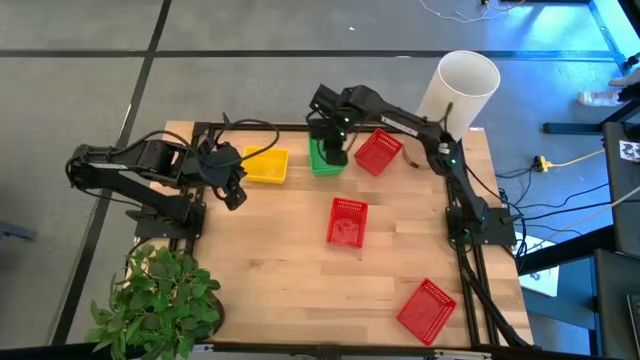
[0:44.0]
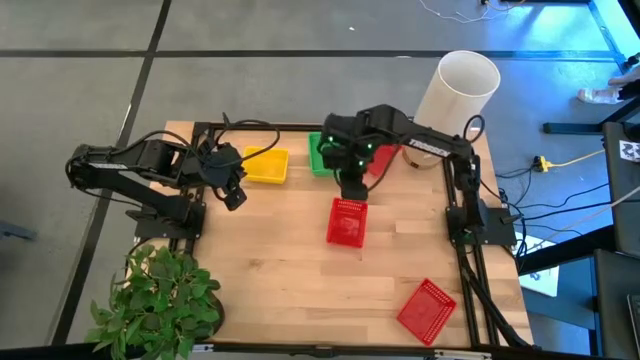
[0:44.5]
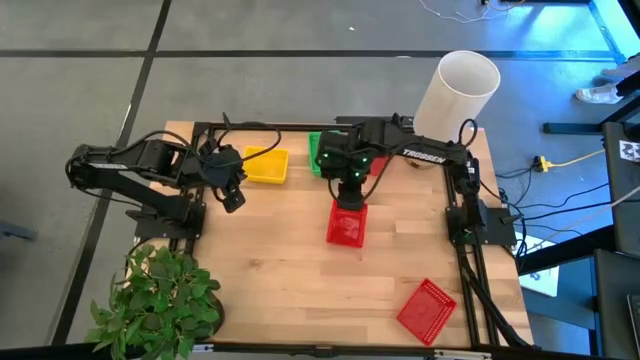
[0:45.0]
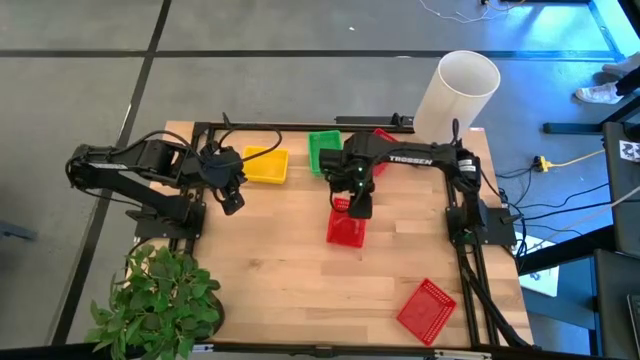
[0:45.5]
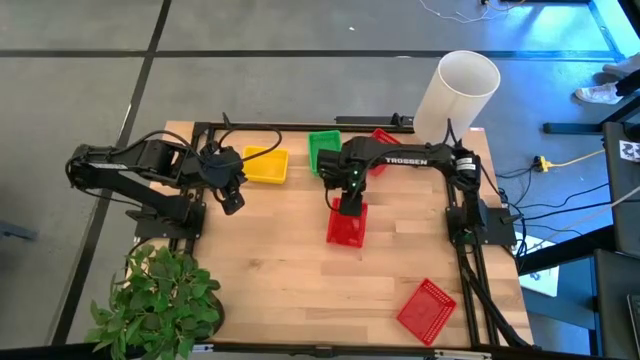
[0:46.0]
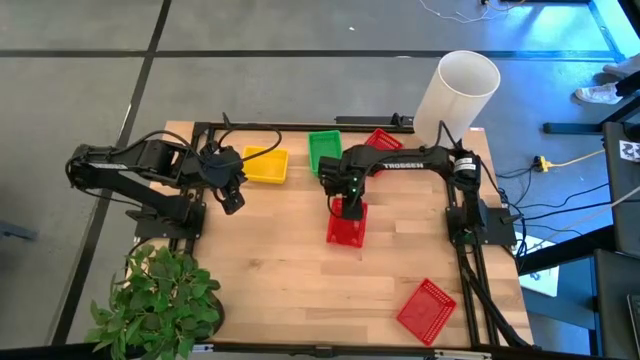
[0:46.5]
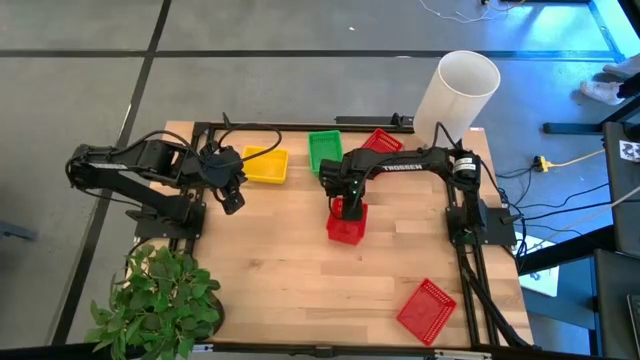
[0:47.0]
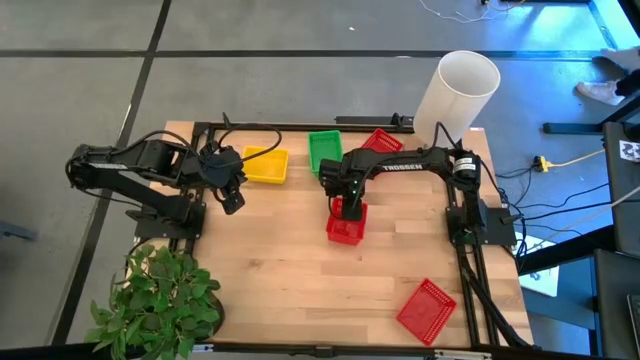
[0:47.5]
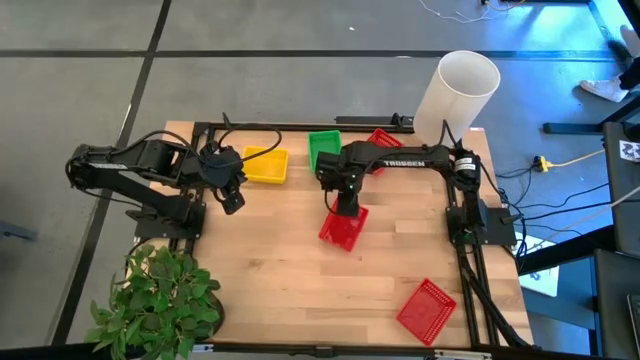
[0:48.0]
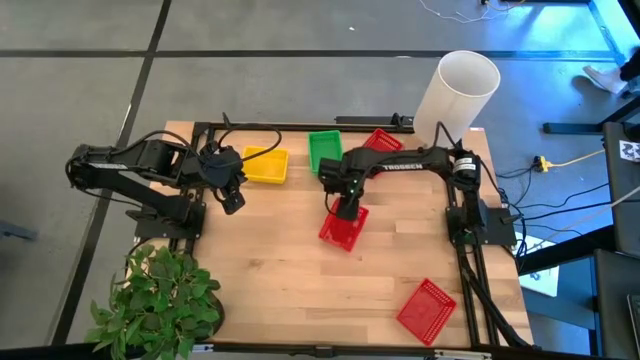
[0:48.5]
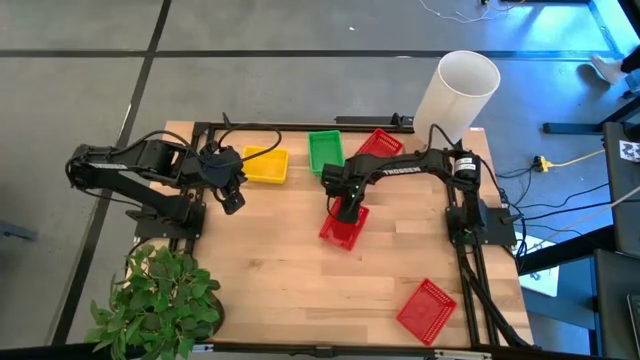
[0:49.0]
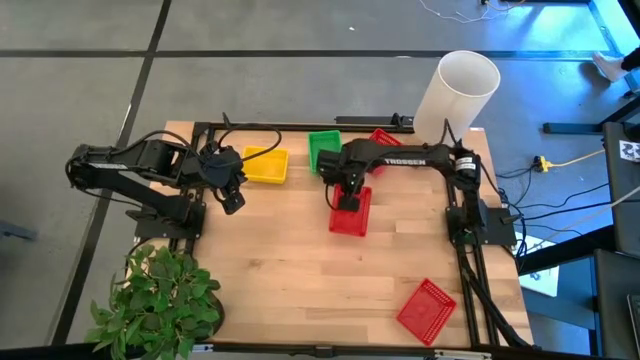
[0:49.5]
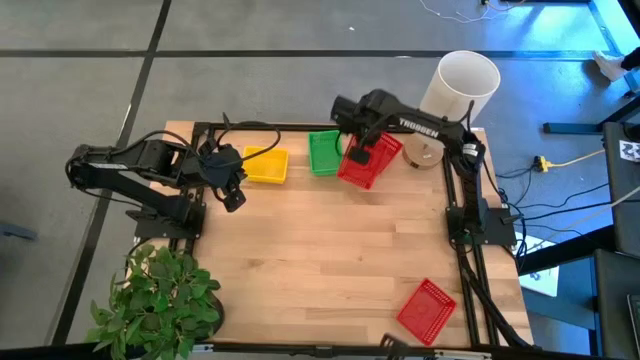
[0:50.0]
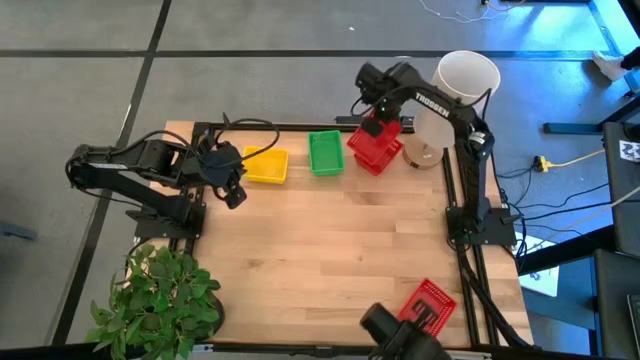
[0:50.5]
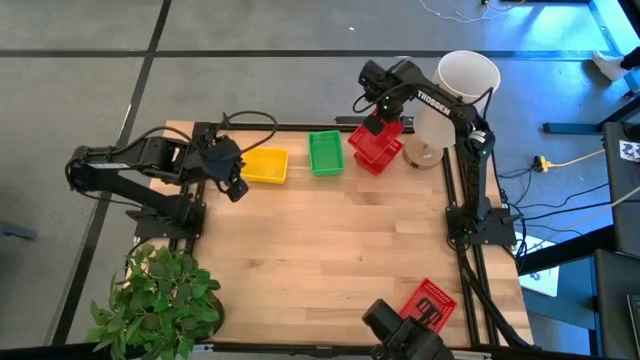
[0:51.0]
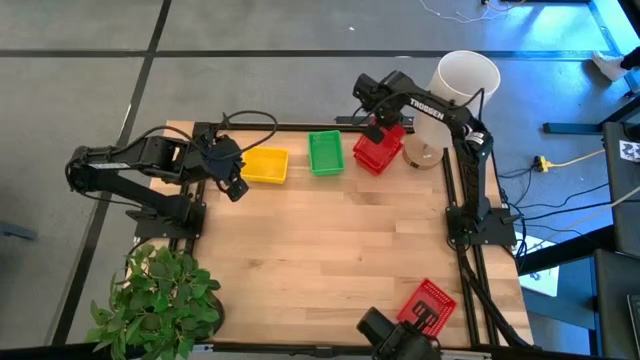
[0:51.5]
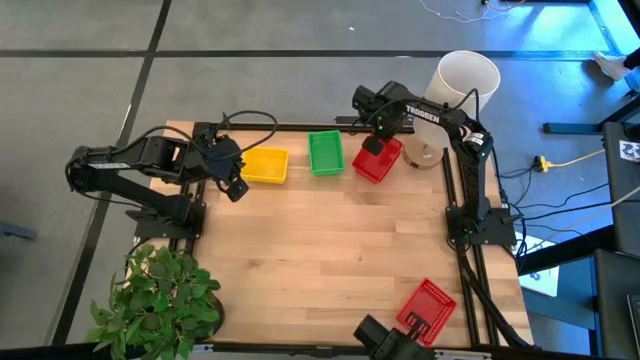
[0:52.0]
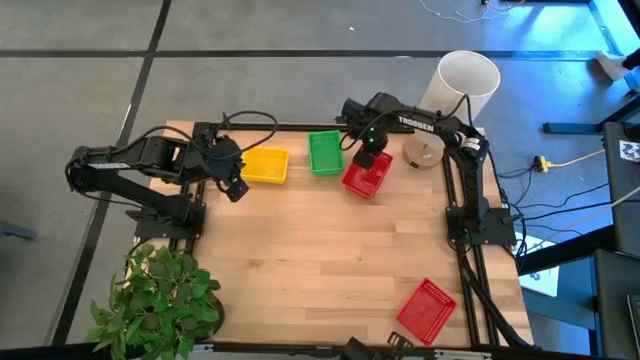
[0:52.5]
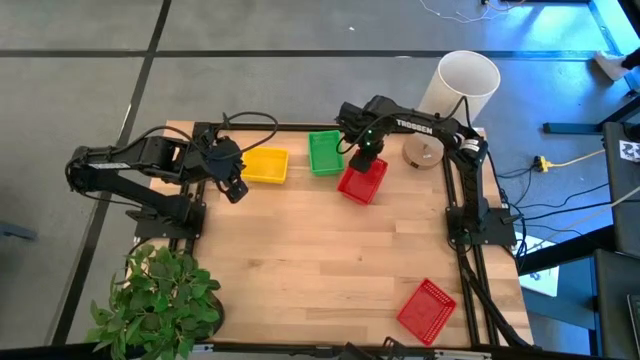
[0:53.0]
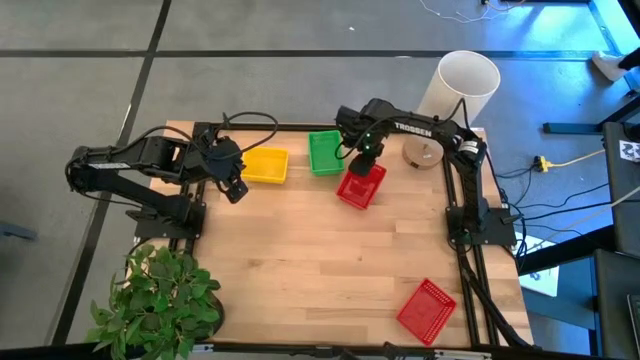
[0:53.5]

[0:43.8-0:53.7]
Stack the middle red bin on top of the top red bin

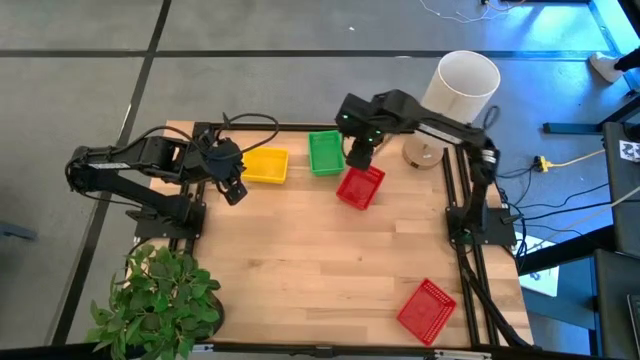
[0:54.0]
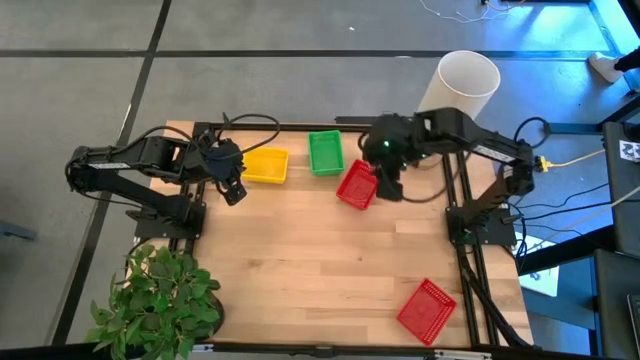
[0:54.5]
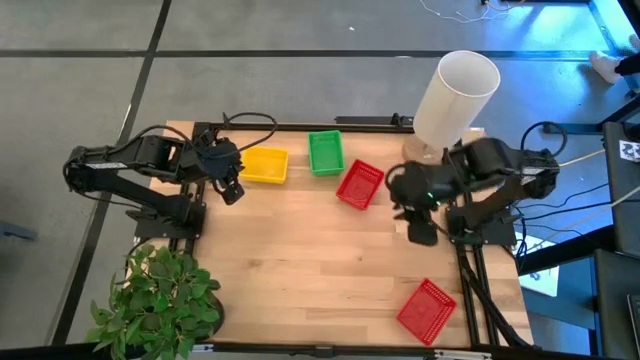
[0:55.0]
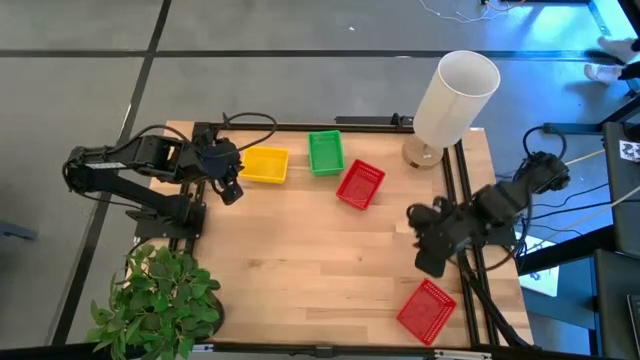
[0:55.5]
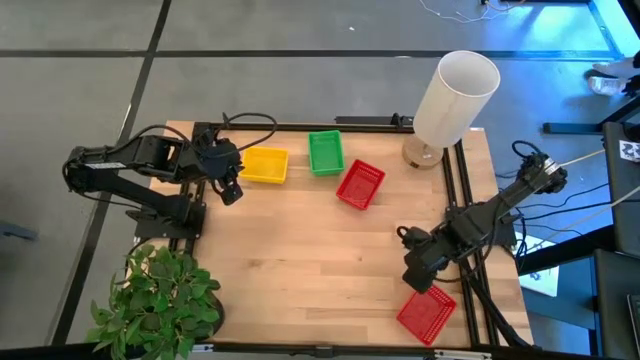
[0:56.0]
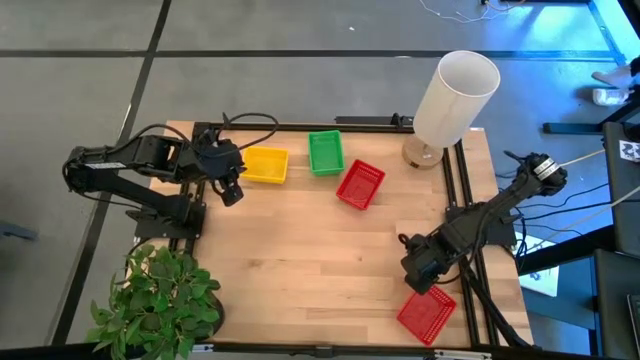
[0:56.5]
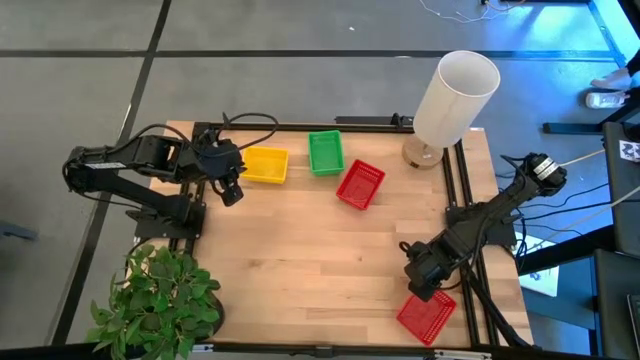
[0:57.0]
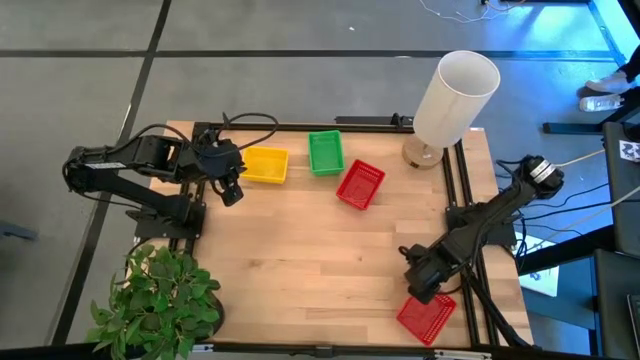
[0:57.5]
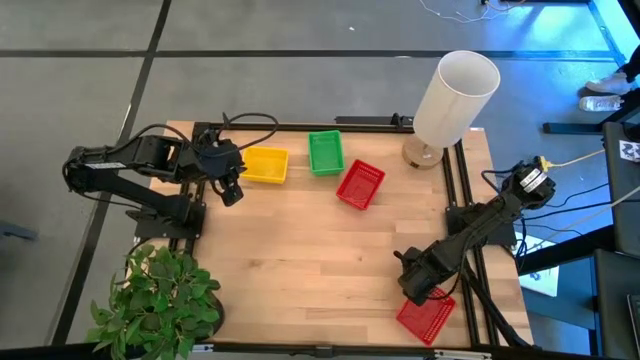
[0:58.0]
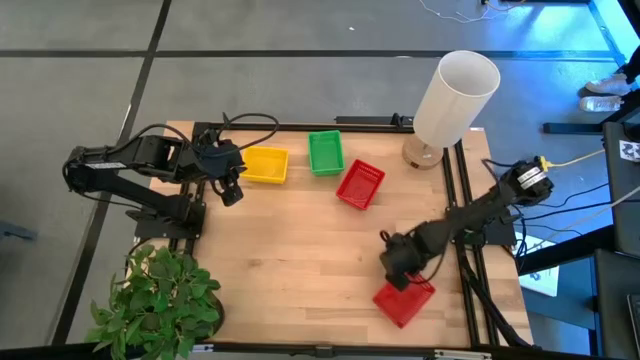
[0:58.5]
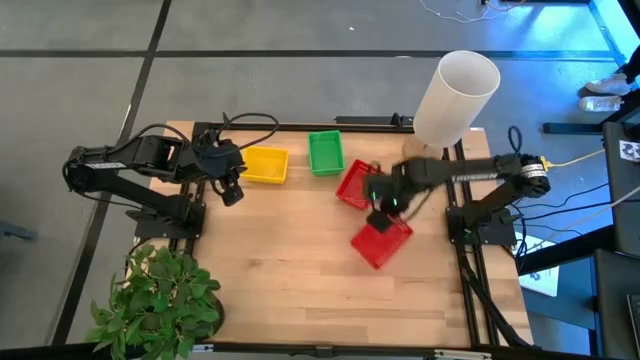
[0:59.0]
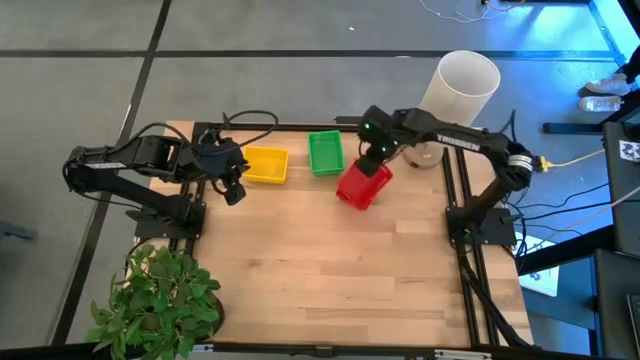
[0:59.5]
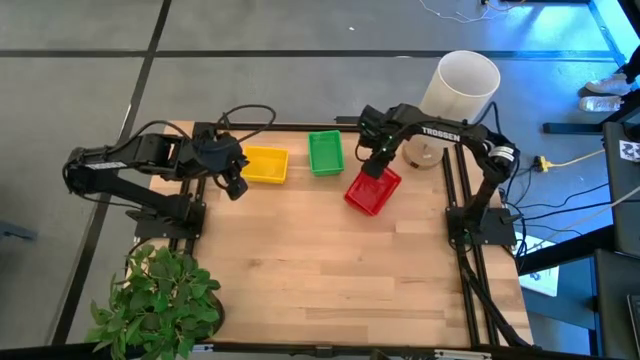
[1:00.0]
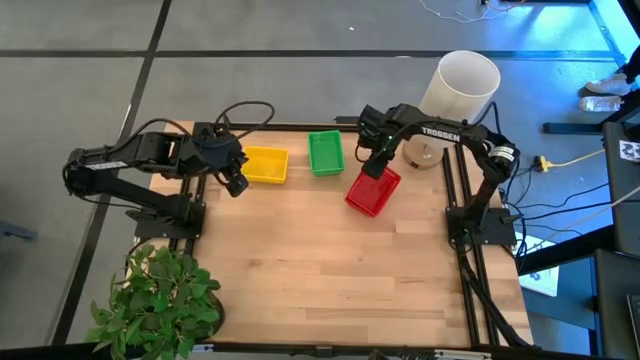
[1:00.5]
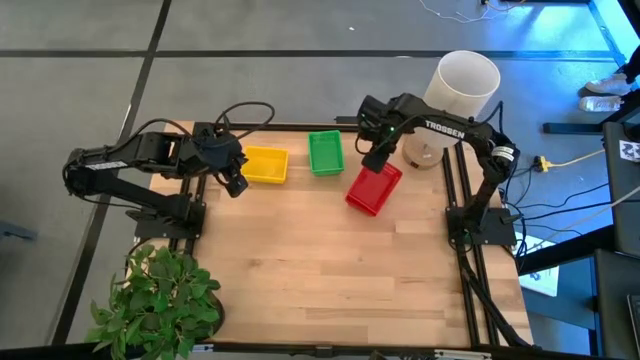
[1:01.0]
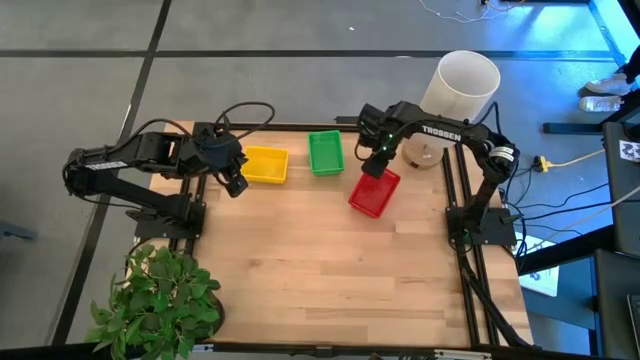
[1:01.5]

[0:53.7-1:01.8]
Stack the bottom red bin on top of the top red bins

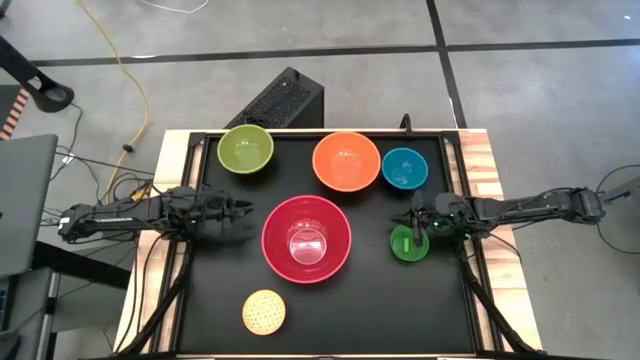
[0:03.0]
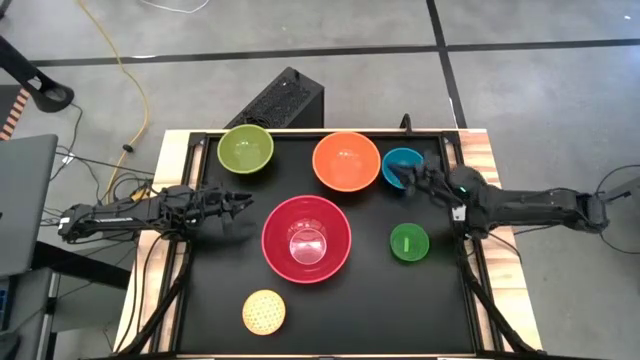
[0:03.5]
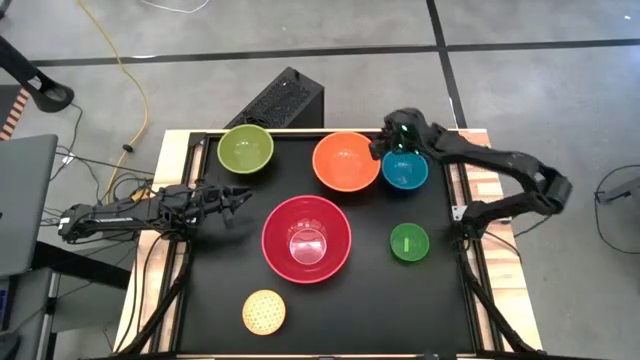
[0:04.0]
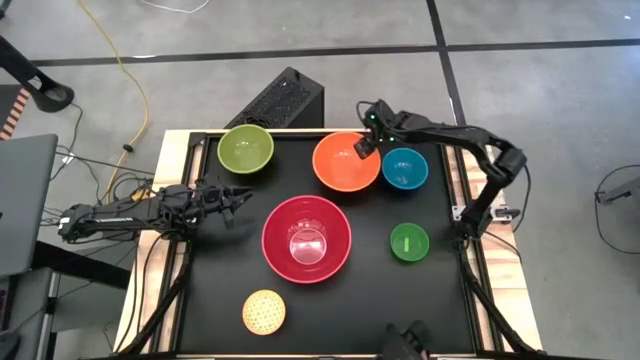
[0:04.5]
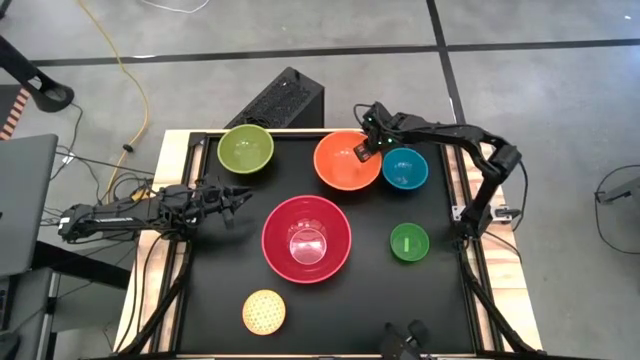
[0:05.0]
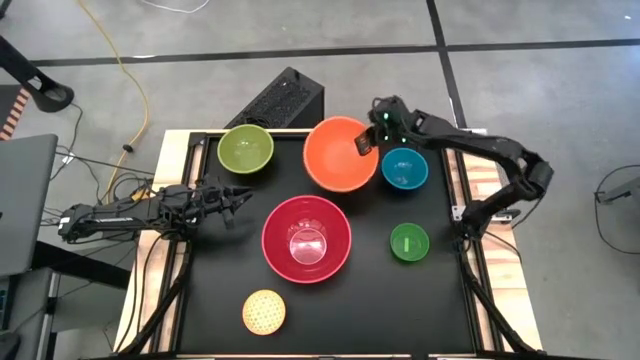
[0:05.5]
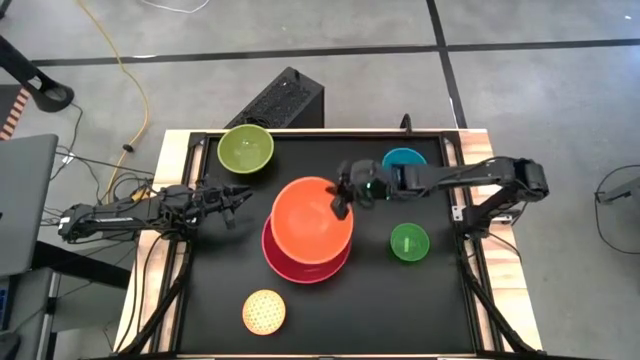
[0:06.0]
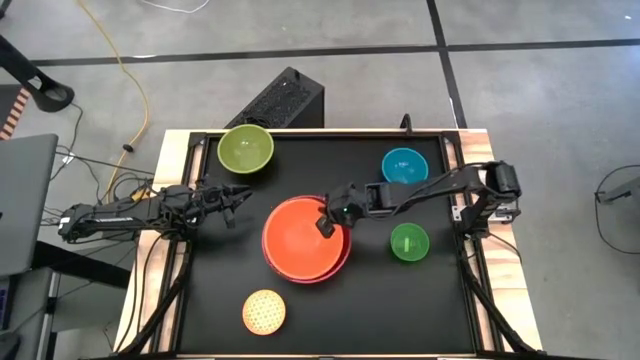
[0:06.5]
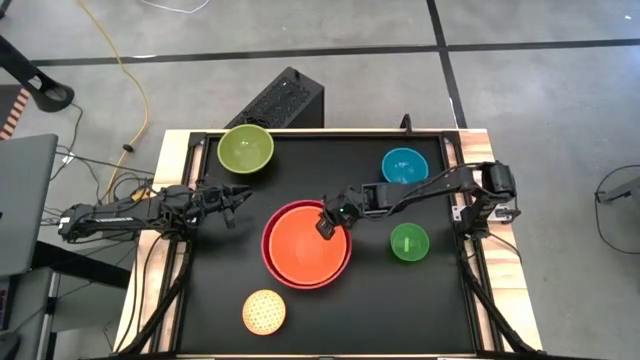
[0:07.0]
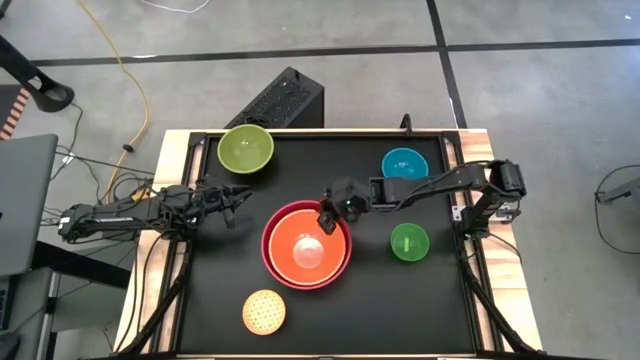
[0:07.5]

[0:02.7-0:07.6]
Stack the orange bowl on top of the red bowl
